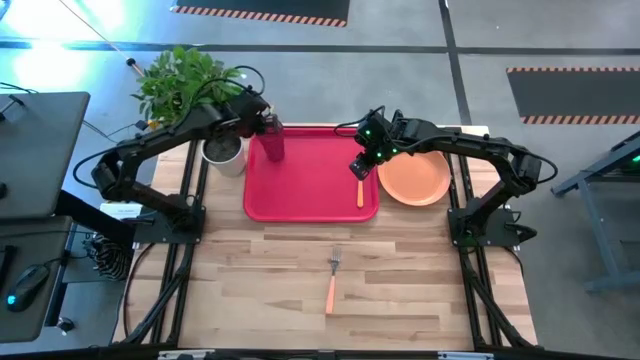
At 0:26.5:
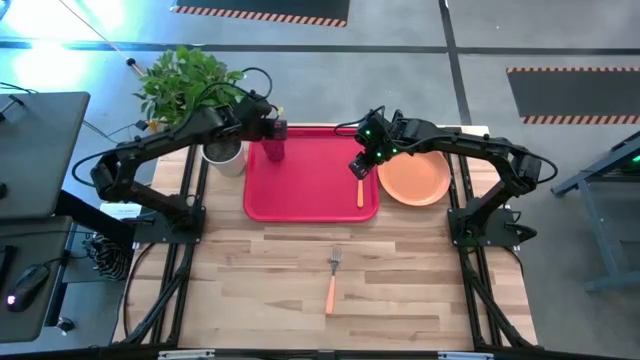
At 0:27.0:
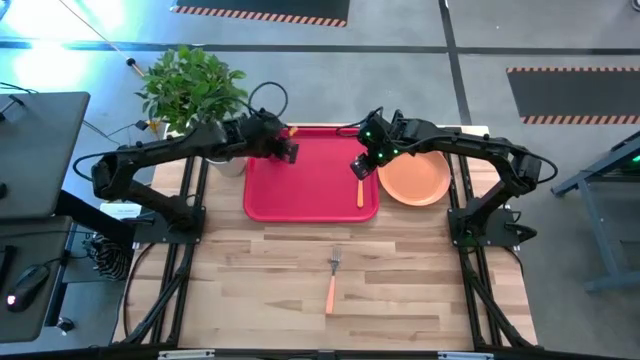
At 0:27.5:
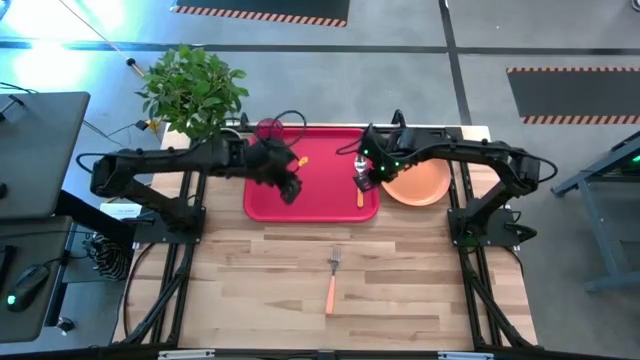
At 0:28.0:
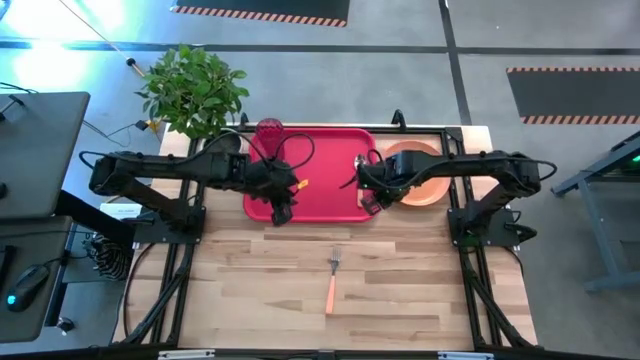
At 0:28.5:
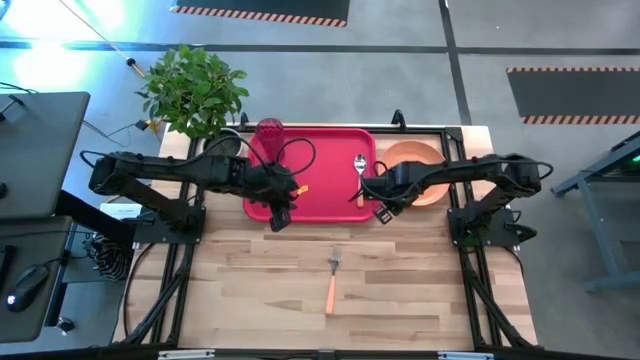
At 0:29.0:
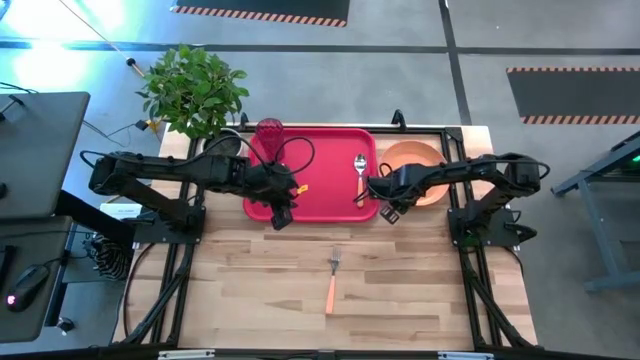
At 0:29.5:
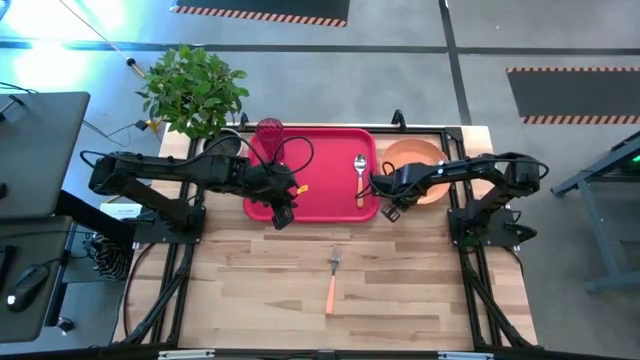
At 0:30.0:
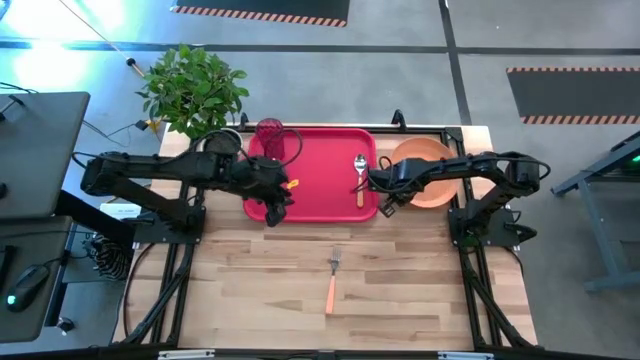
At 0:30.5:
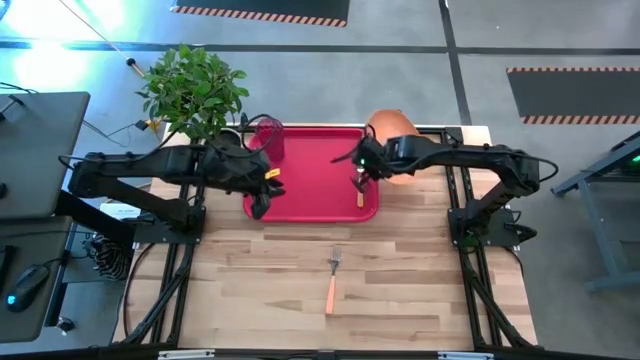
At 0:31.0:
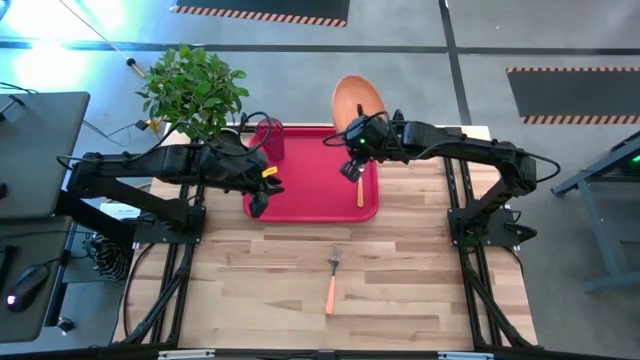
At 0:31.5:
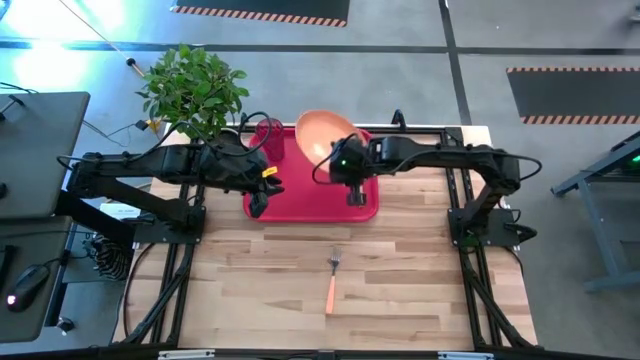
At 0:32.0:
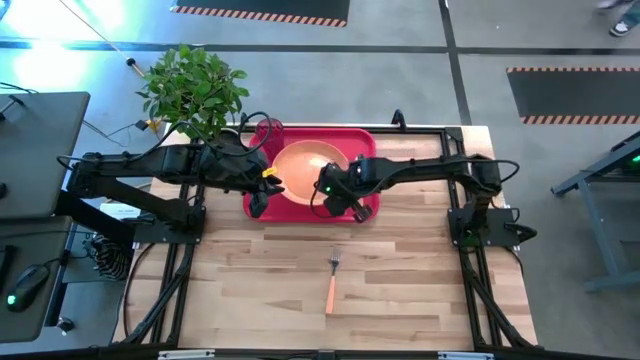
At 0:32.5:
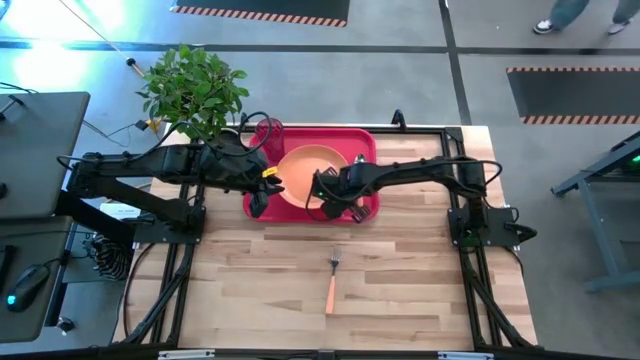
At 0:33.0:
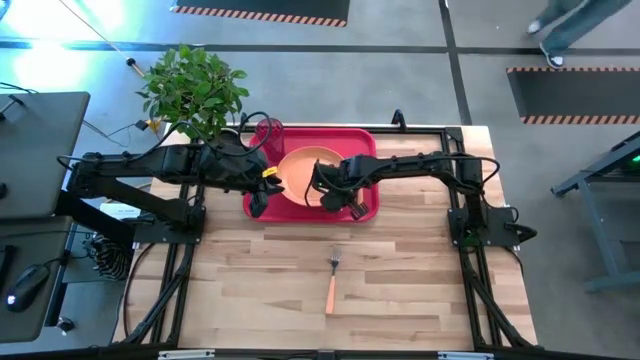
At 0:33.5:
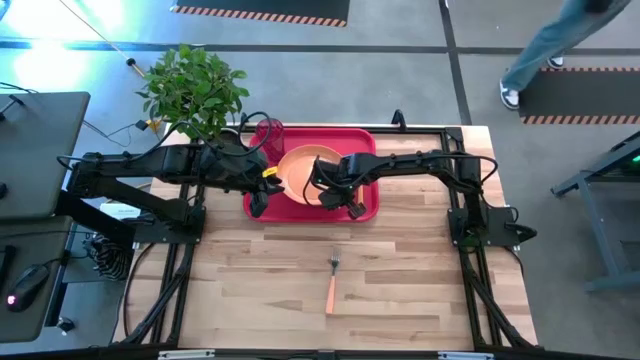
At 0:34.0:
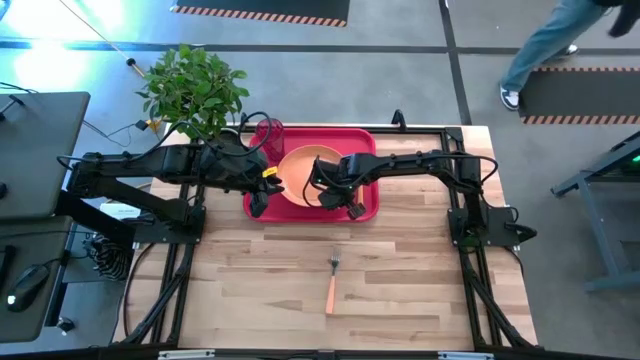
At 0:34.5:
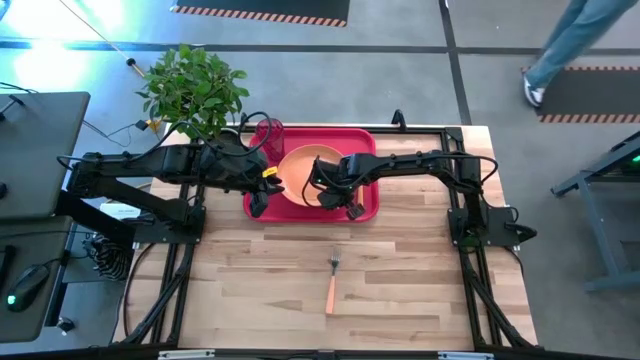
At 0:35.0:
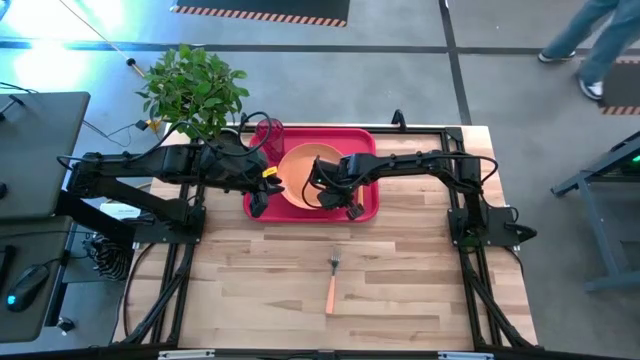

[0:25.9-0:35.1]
Task: Pick and place plate/cup/fork/spoon on tray
Put the orange plate on the middle of the red tray

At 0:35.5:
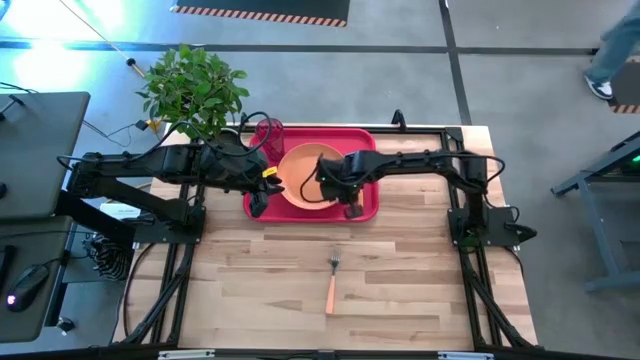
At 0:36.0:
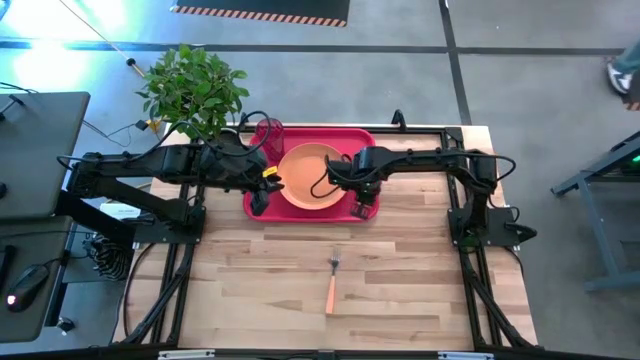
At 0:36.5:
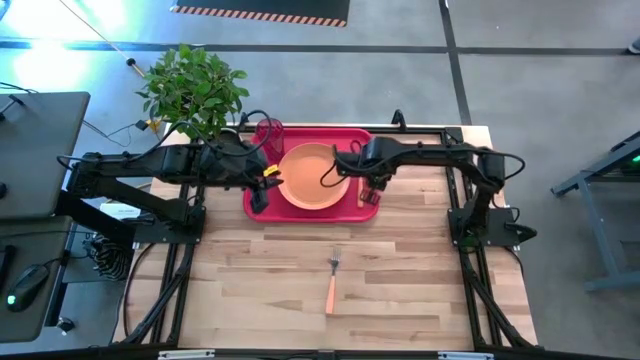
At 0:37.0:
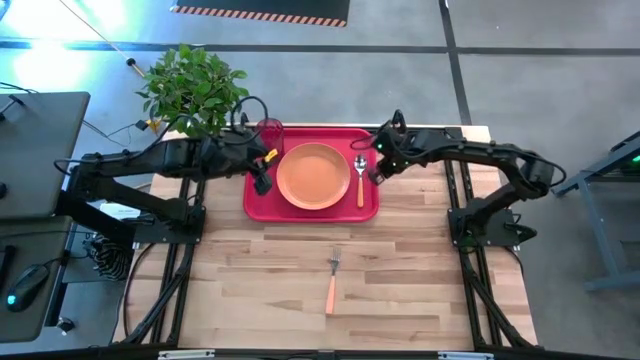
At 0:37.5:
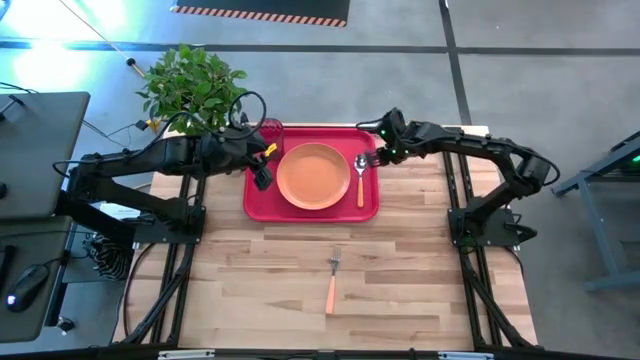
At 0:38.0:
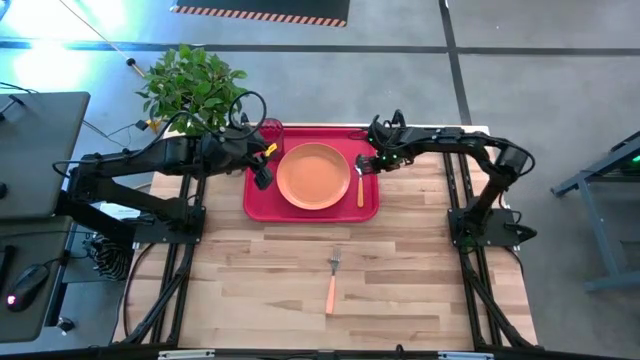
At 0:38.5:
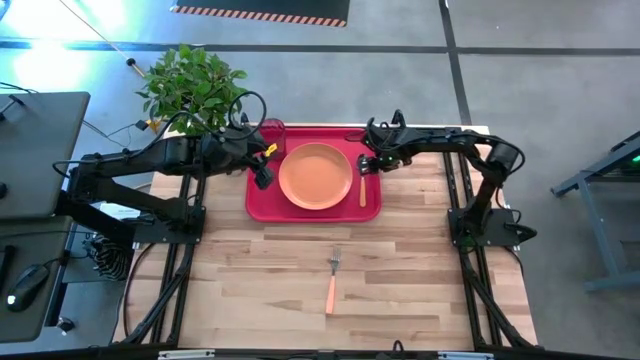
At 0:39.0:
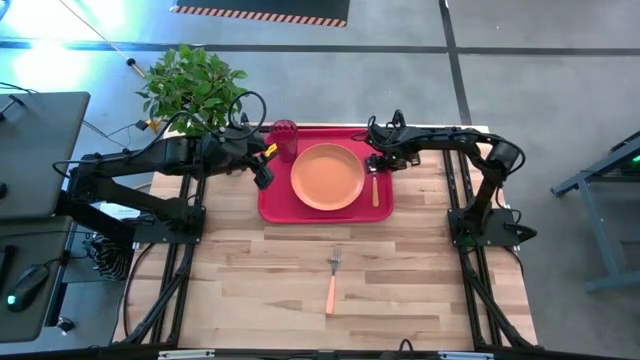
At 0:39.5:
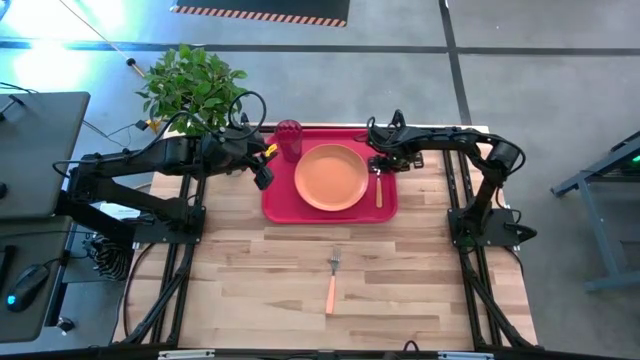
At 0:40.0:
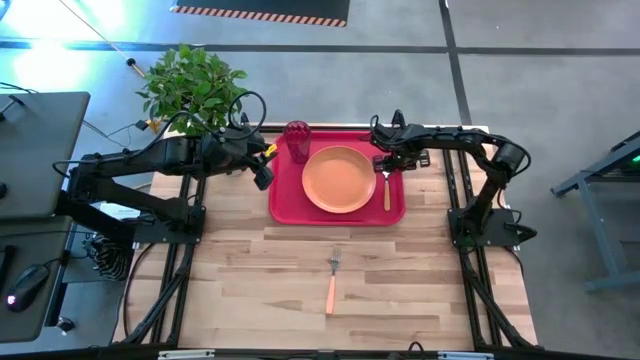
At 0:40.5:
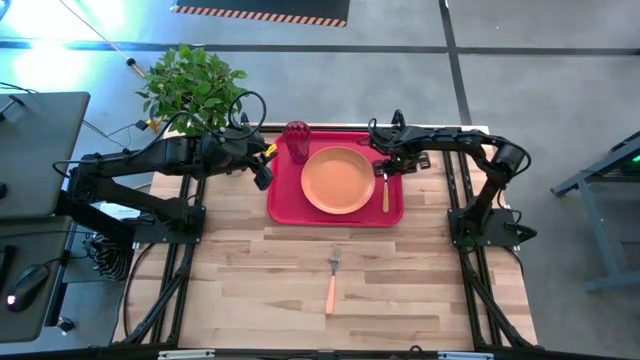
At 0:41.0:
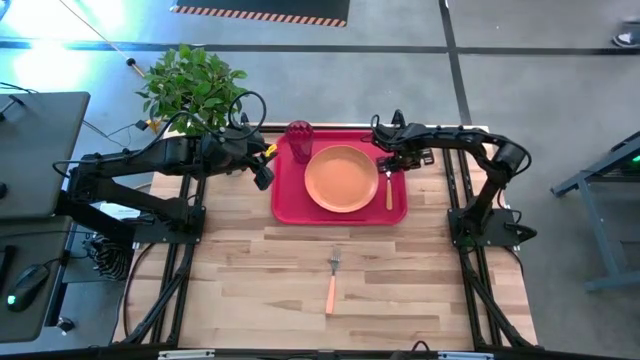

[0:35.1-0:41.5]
Adjust the red tray on the table

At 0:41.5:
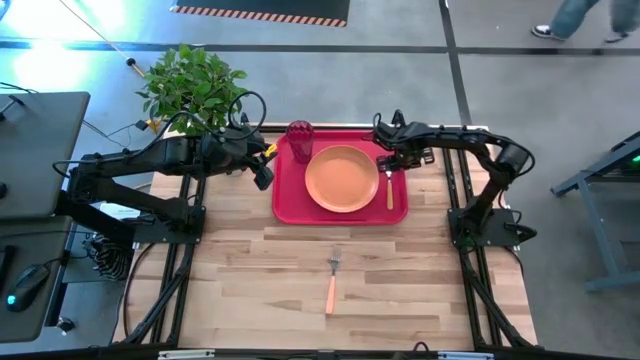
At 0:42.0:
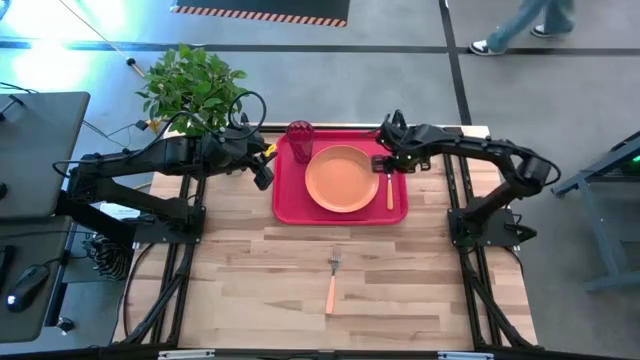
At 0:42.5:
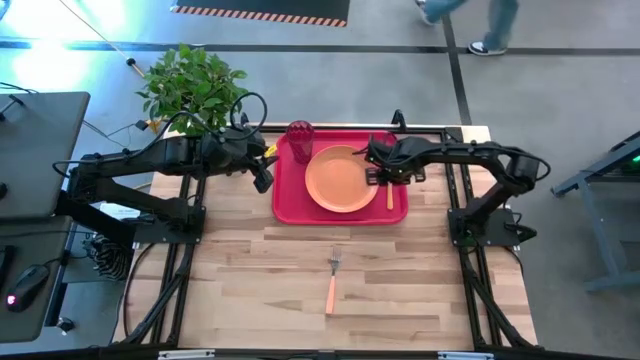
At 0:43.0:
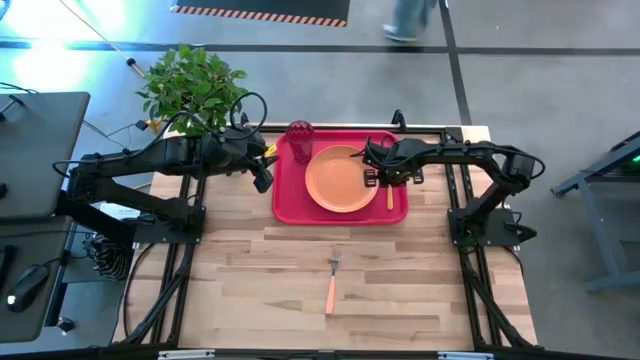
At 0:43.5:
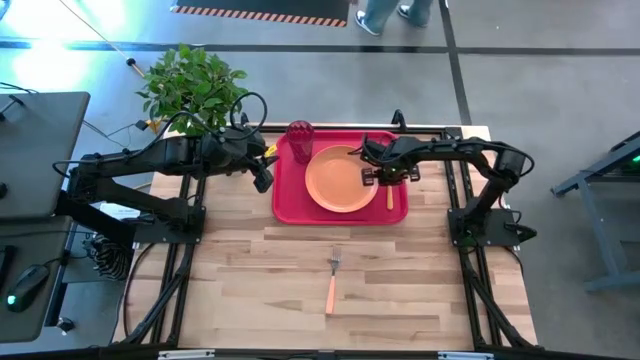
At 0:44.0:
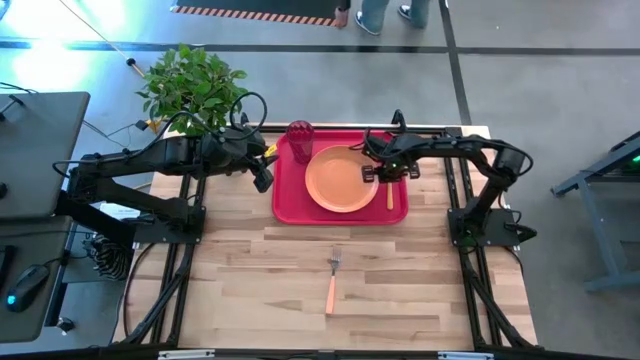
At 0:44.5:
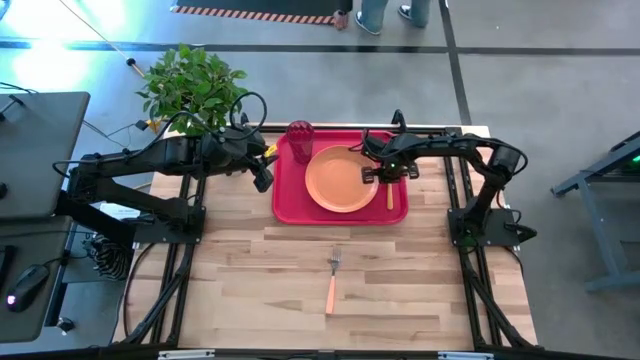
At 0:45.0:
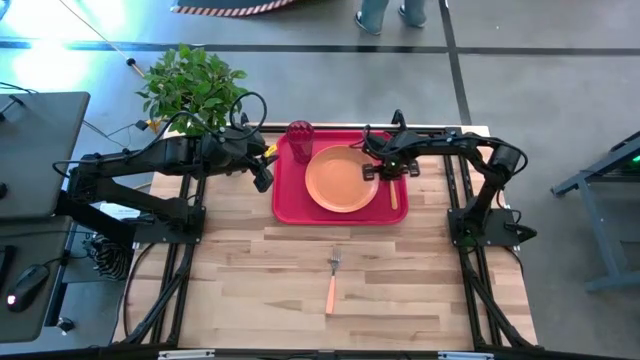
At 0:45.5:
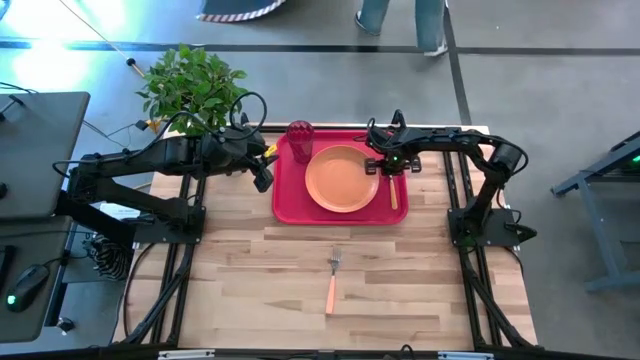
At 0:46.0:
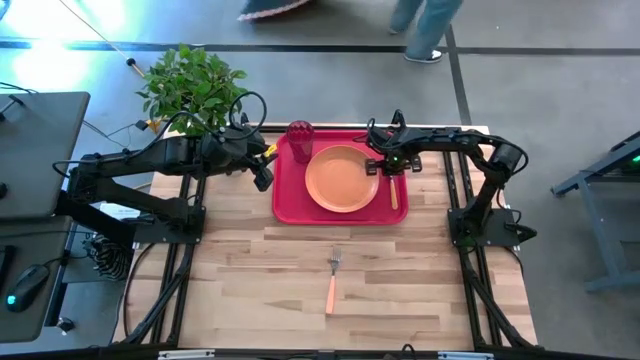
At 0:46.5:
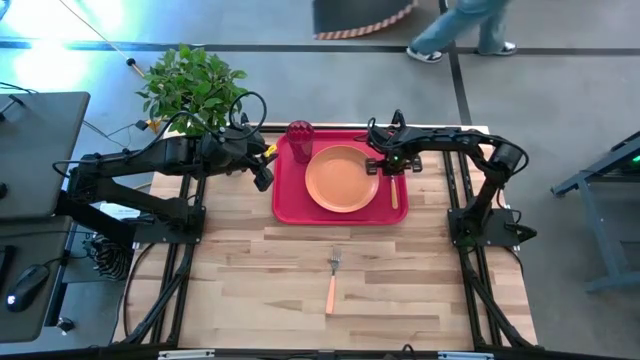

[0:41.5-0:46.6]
Adjust the yellow spoon on the red tray
